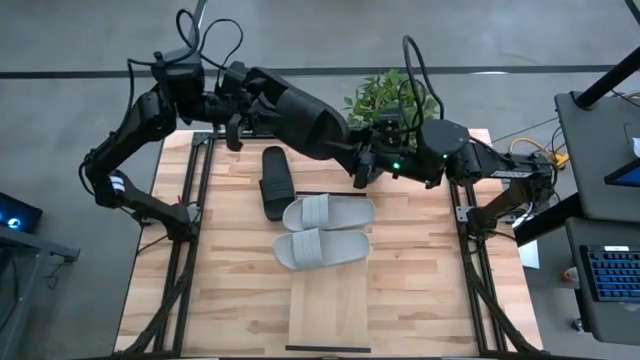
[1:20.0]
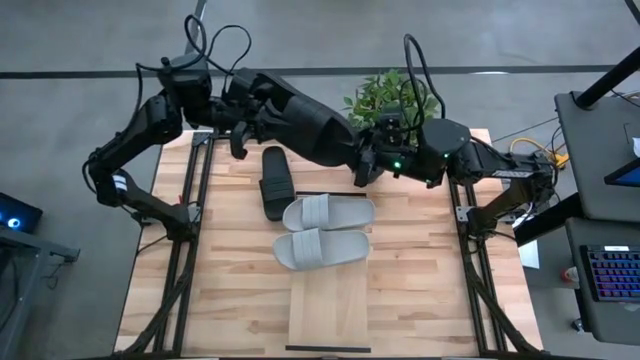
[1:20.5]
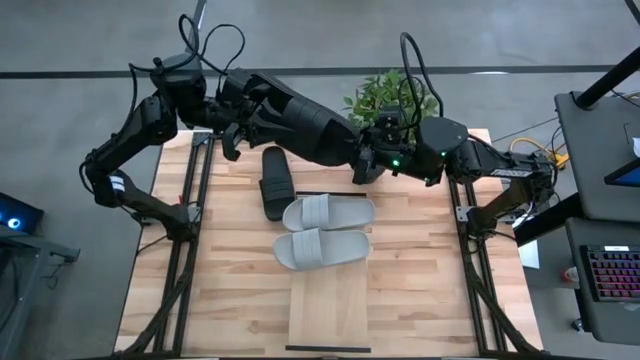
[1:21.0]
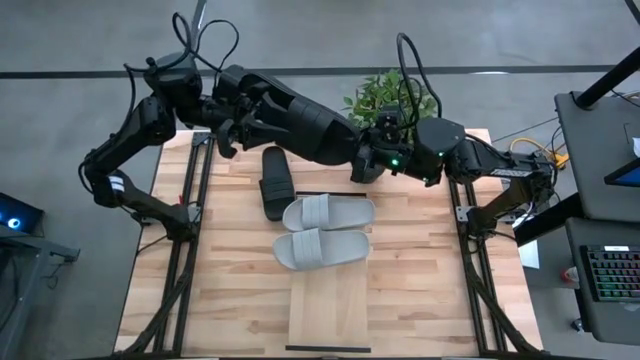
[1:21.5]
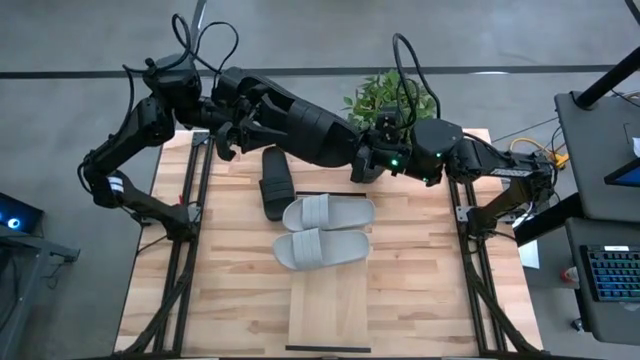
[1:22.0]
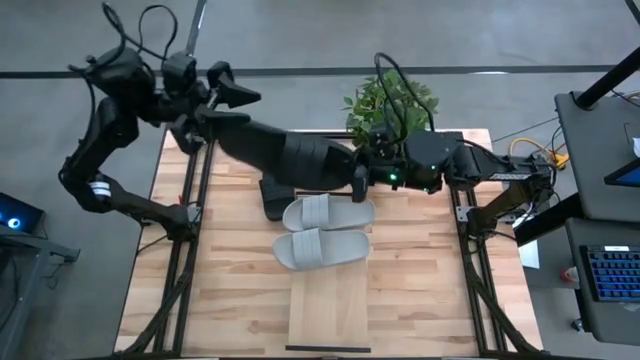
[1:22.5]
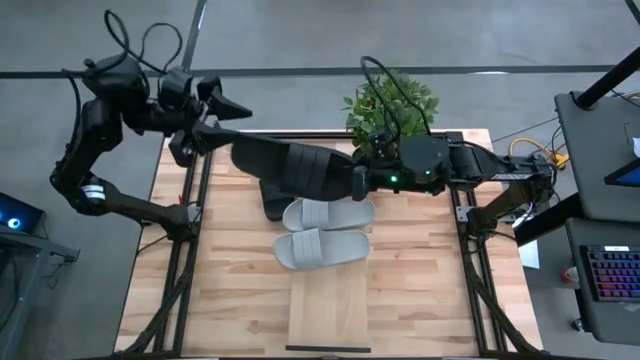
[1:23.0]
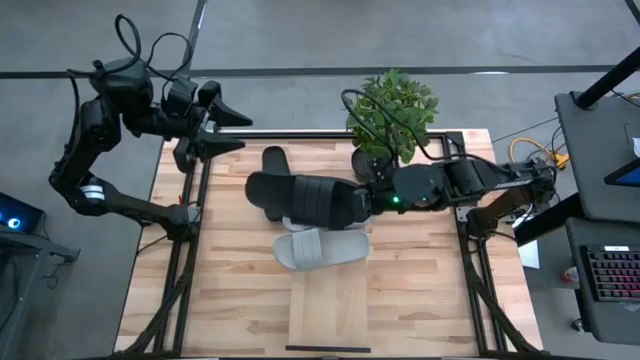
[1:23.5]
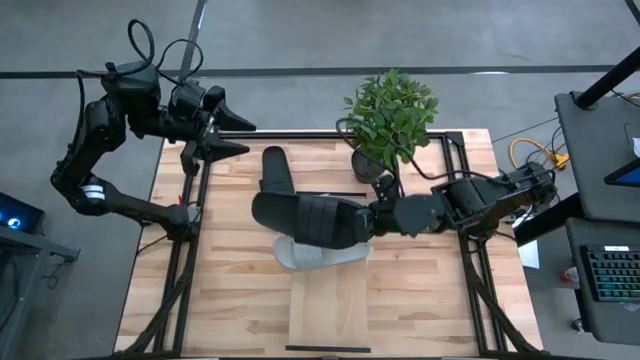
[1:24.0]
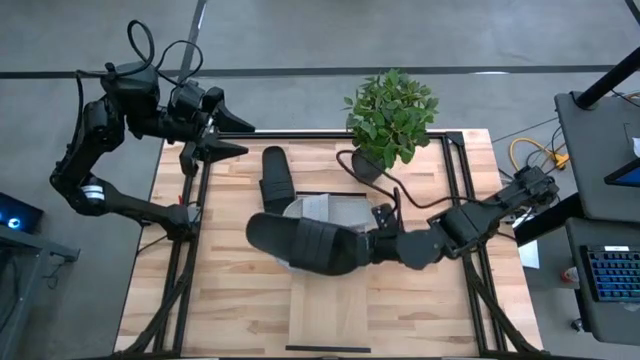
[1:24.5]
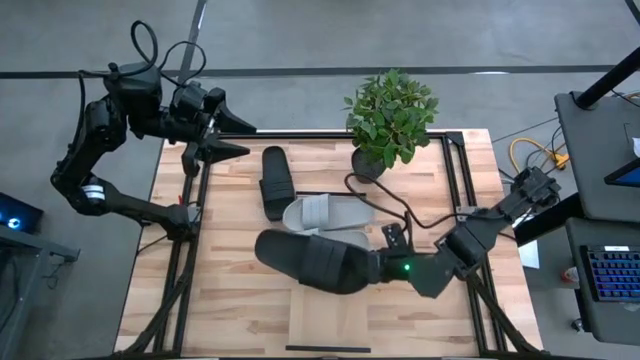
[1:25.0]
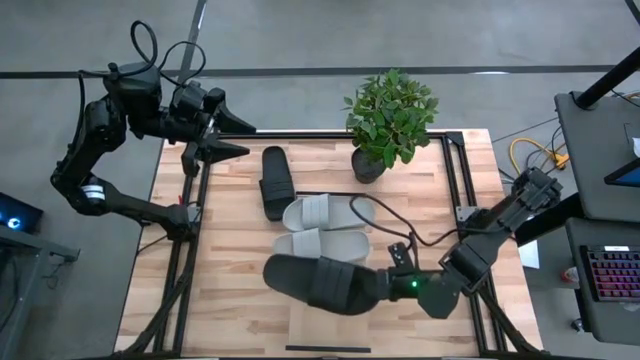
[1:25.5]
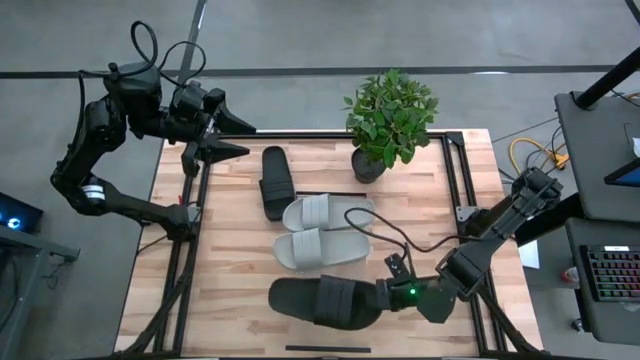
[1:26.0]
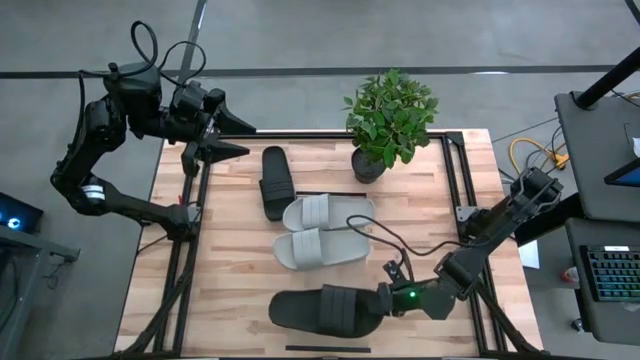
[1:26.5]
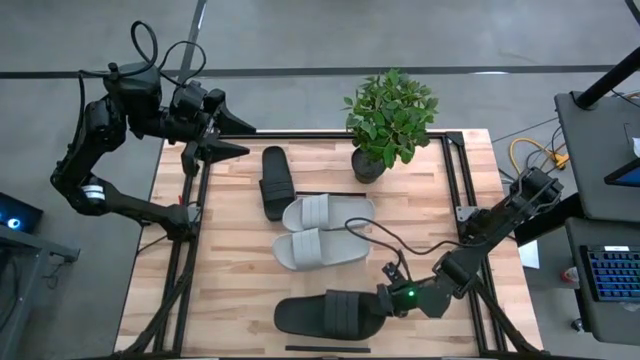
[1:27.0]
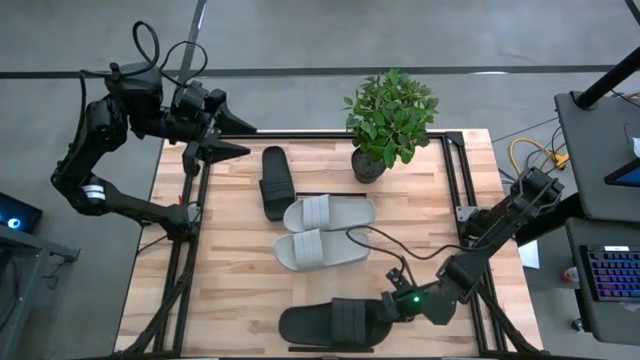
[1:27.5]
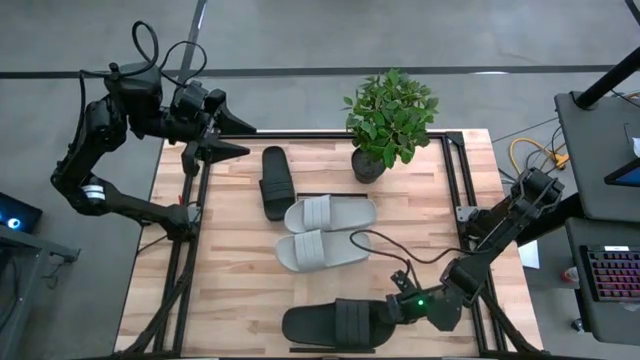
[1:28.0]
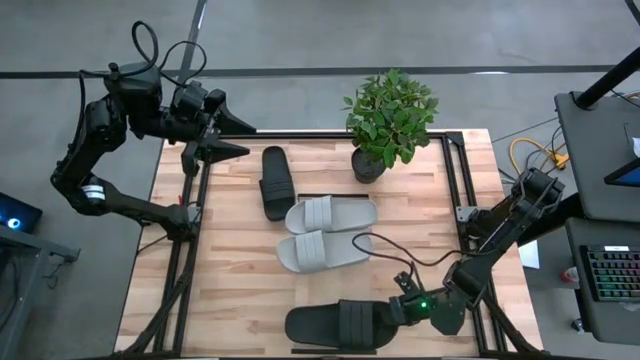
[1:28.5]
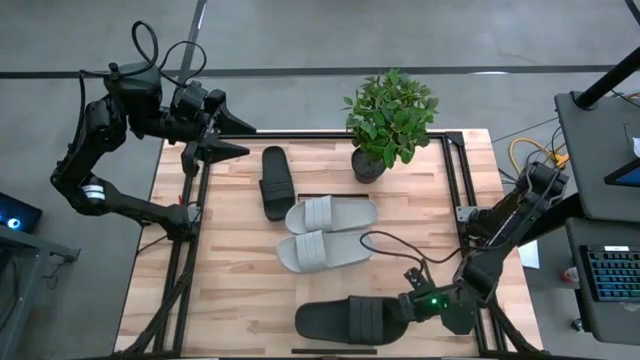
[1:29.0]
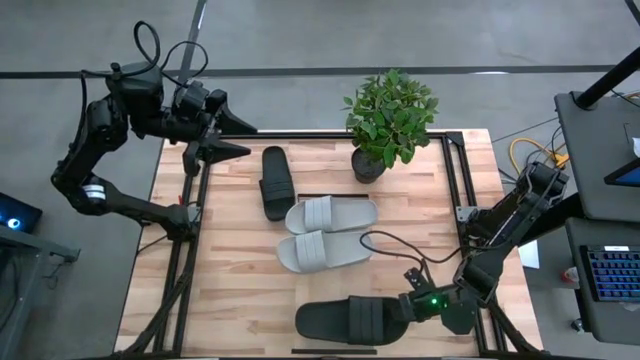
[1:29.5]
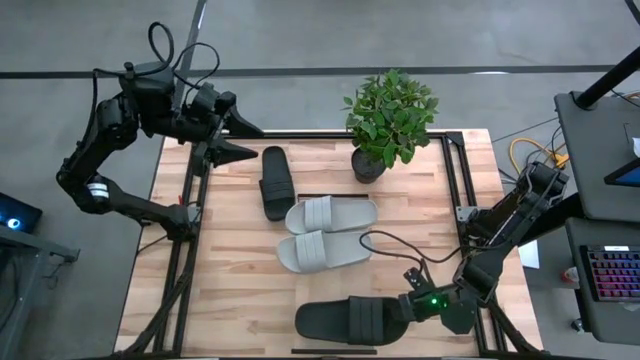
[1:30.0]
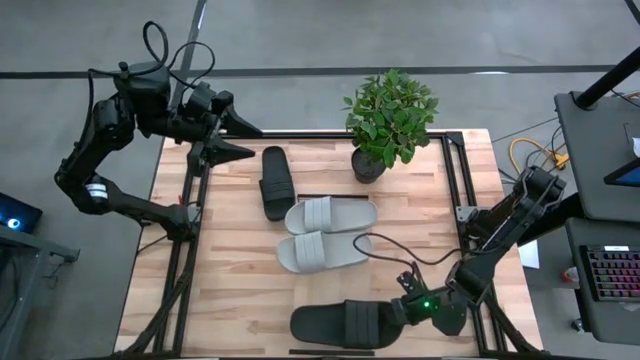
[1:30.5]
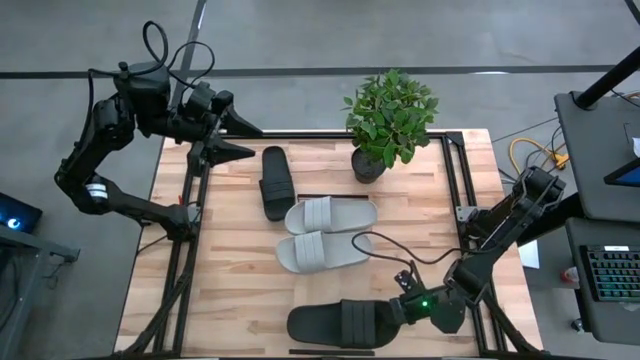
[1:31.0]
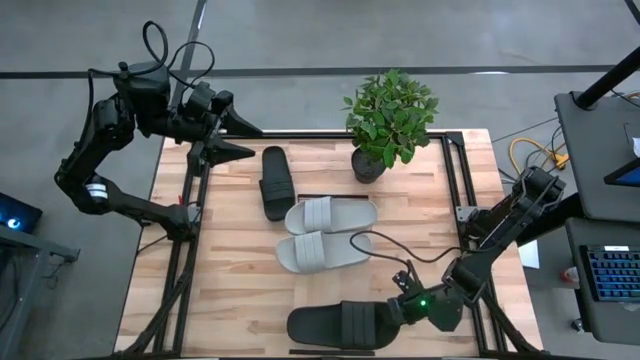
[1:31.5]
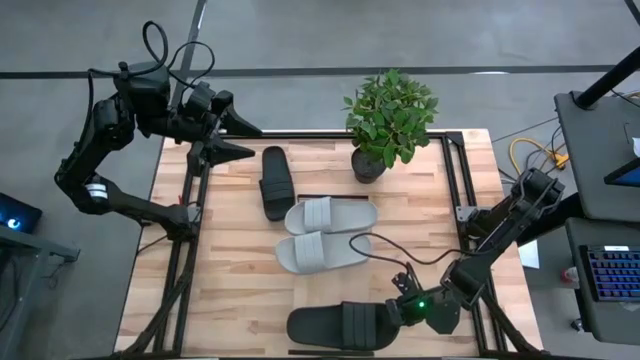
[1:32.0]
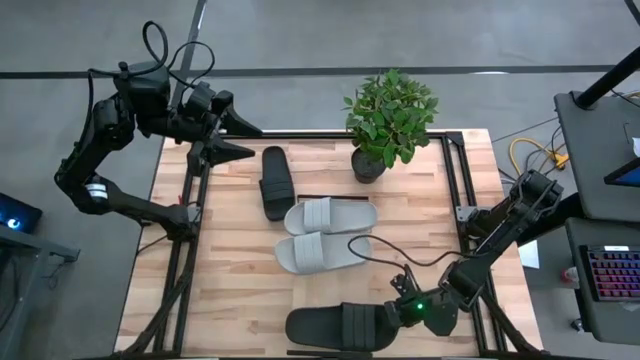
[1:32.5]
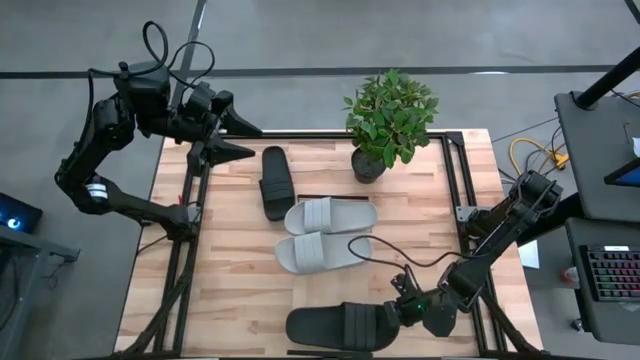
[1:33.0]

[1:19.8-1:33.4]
Task: Pick and place slides into the shelf
Put the left black slipper on the shelf

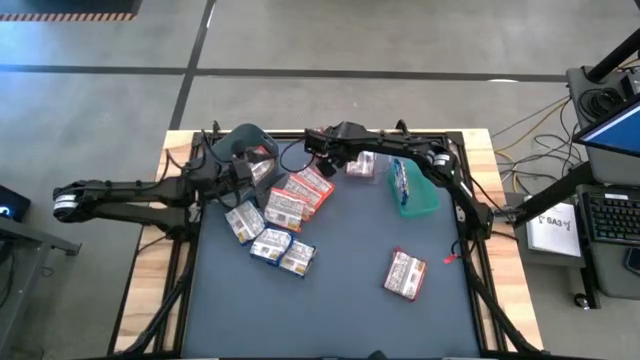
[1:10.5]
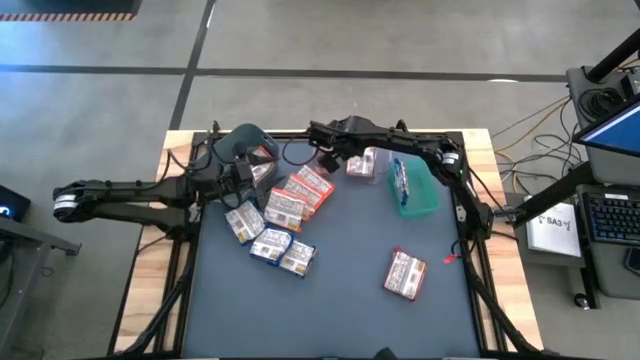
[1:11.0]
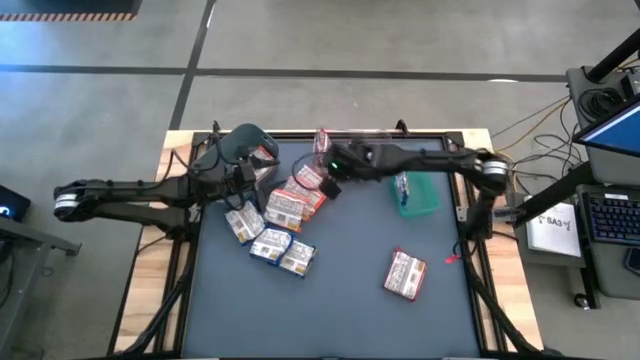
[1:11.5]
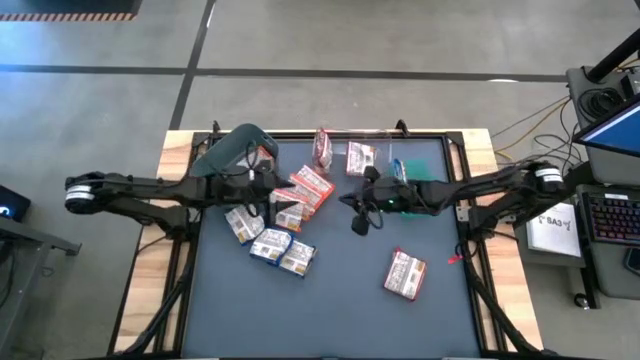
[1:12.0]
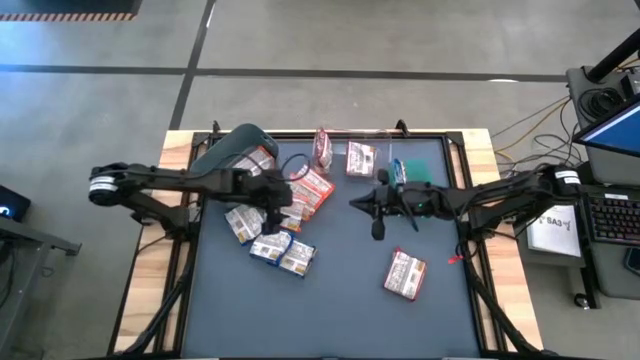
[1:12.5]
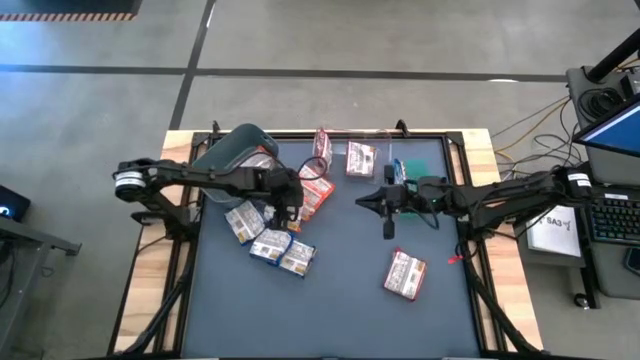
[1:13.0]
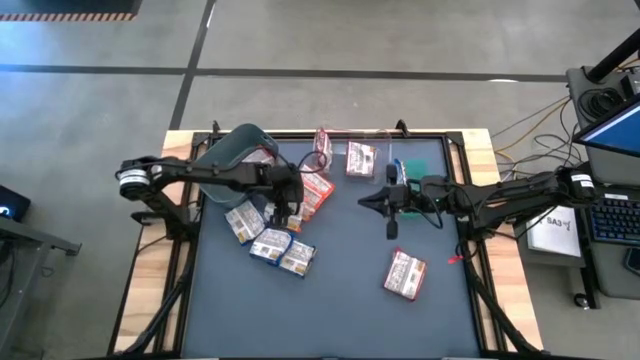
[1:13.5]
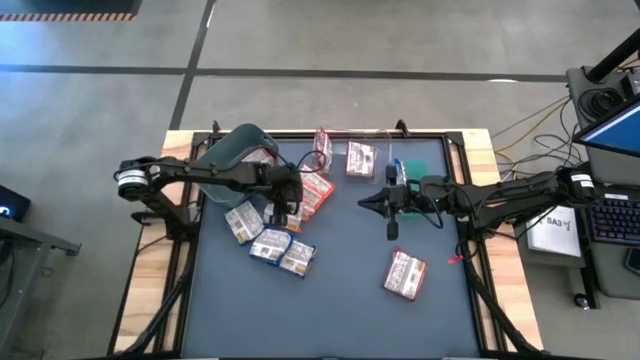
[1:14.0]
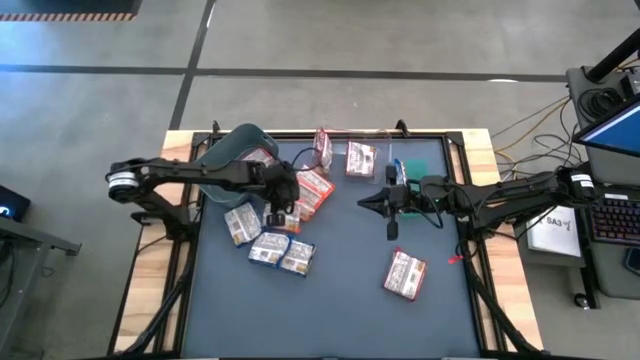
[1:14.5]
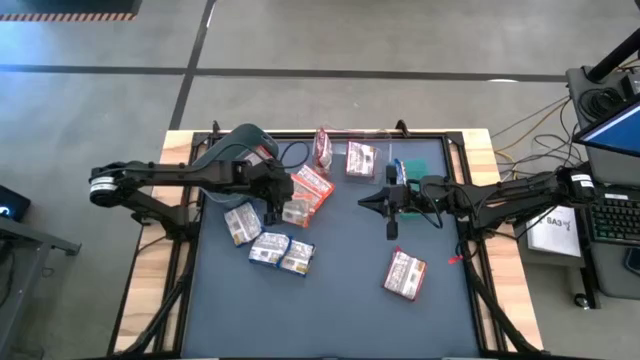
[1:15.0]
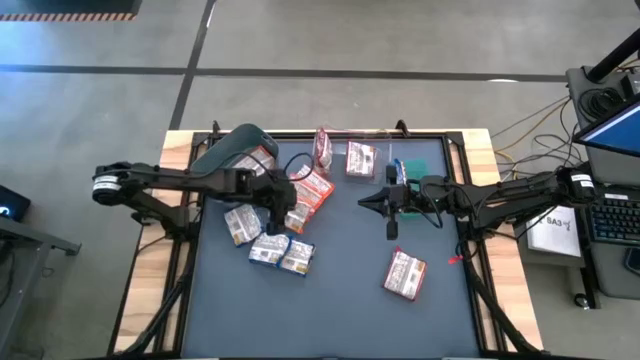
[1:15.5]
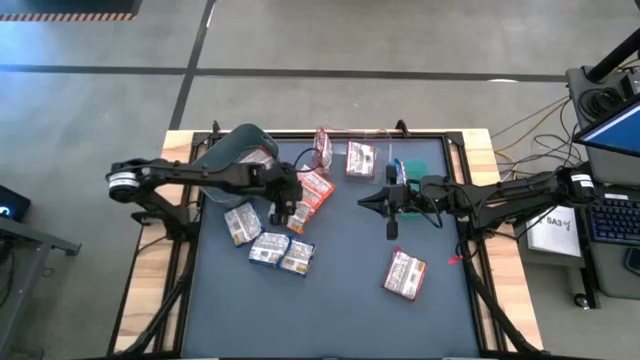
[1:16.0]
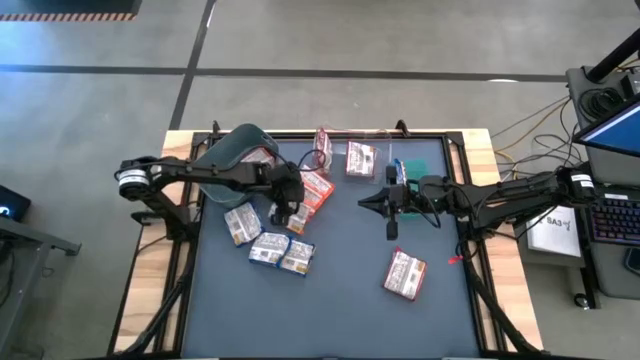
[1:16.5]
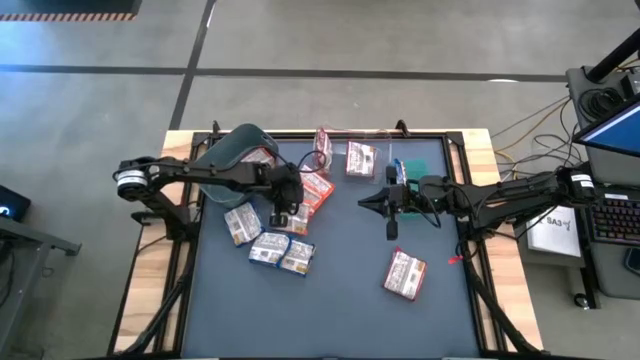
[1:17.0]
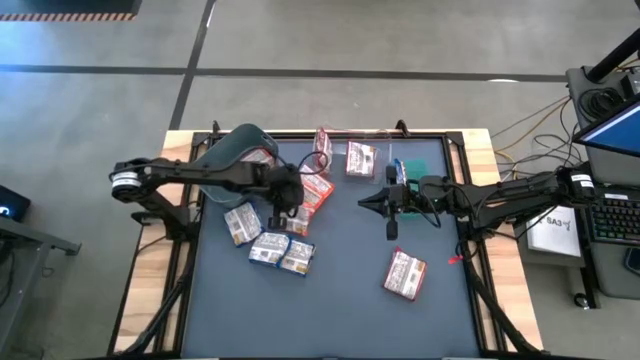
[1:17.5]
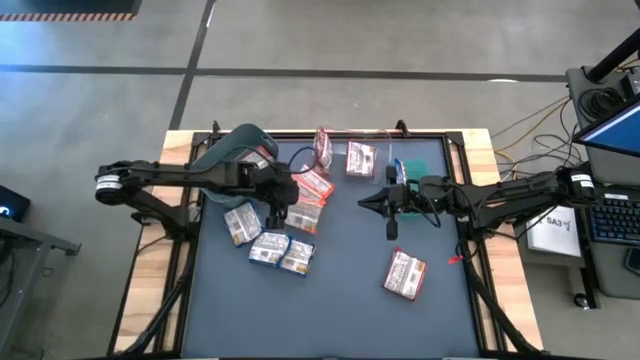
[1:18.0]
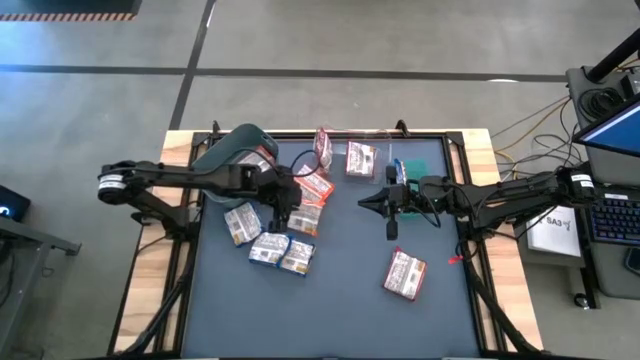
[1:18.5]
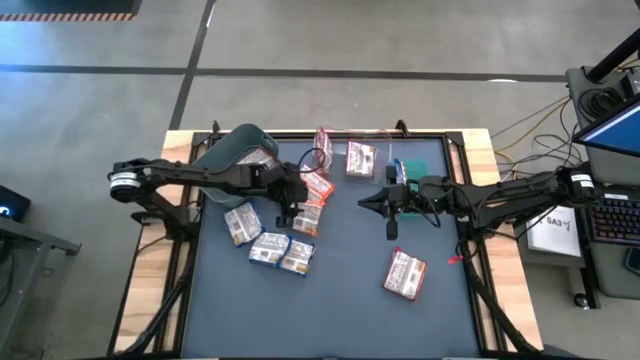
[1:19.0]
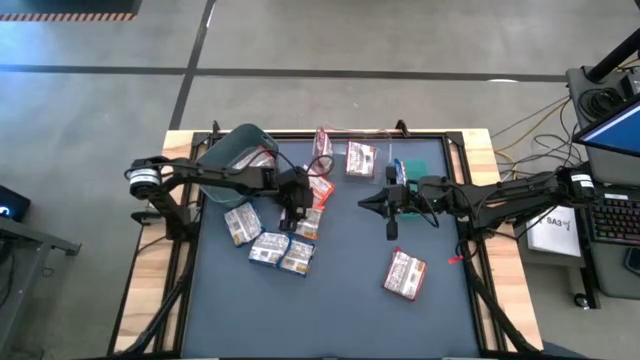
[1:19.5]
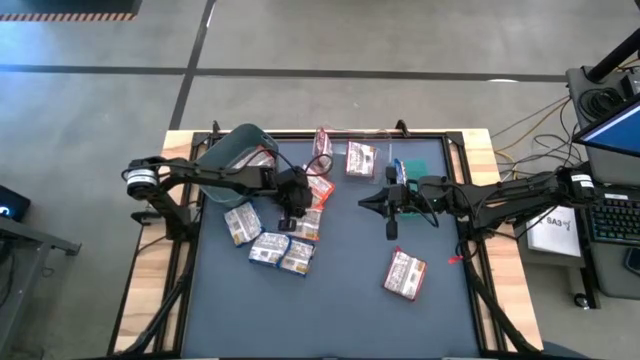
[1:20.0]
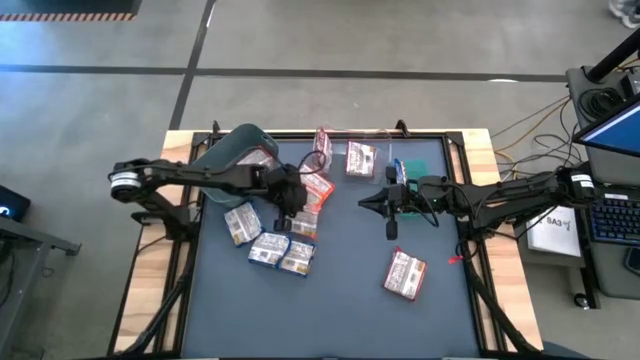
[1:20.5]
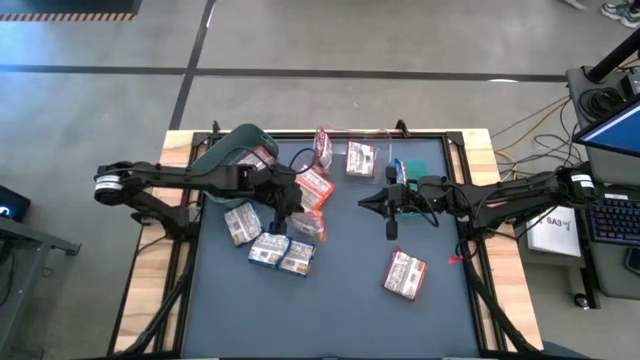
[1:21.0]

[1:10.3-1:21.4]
Task: Sort Maruchan noodles
Put the orange noodle pack into the gray bin
